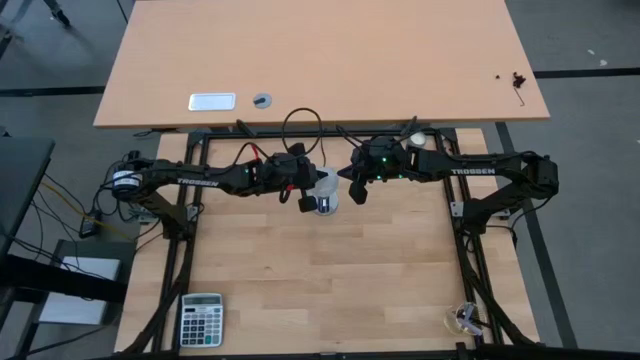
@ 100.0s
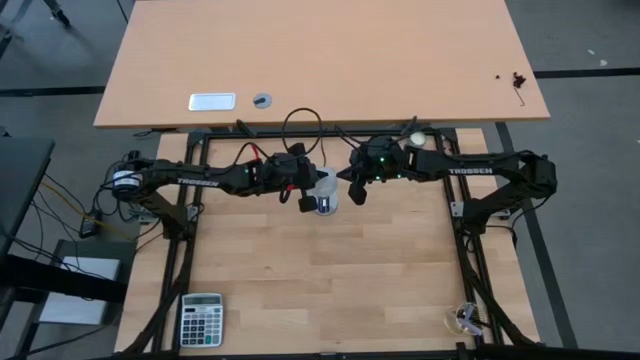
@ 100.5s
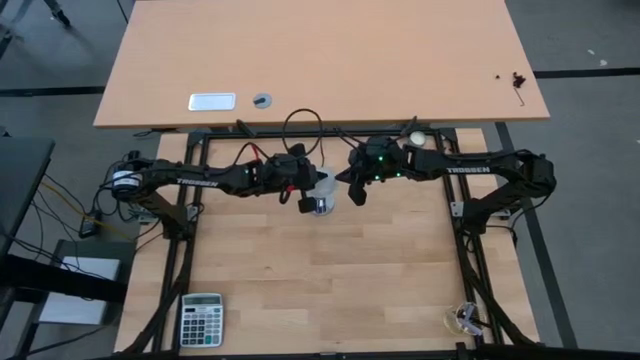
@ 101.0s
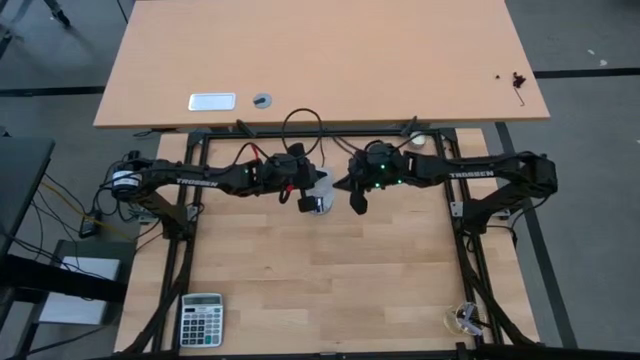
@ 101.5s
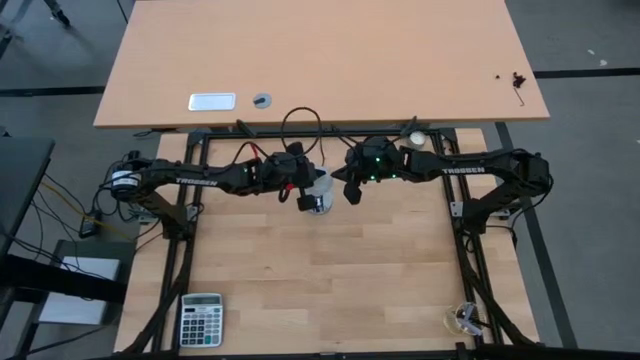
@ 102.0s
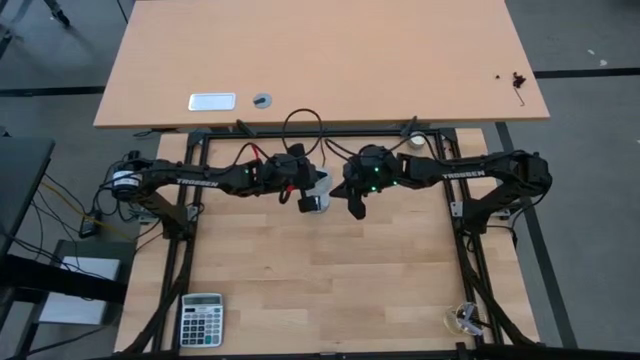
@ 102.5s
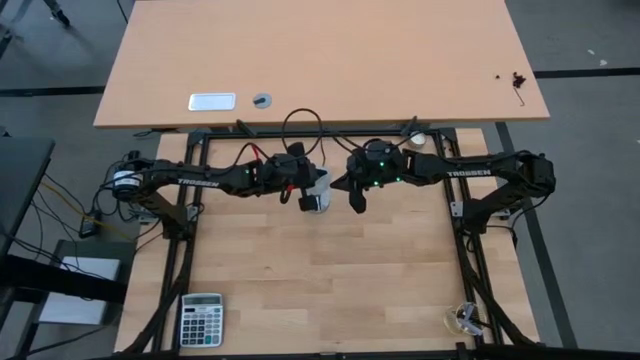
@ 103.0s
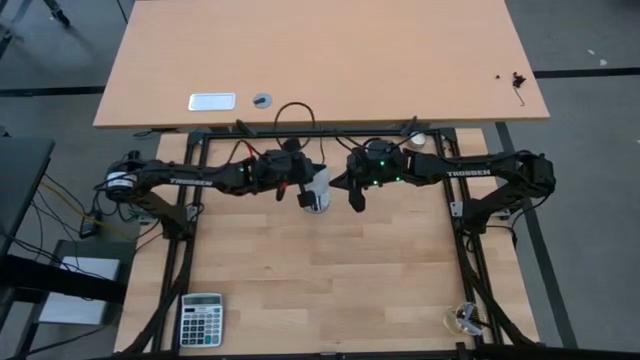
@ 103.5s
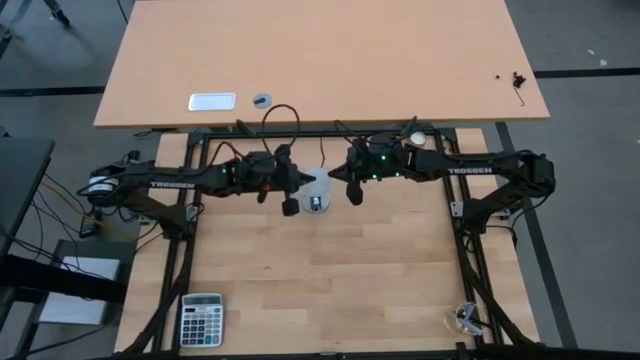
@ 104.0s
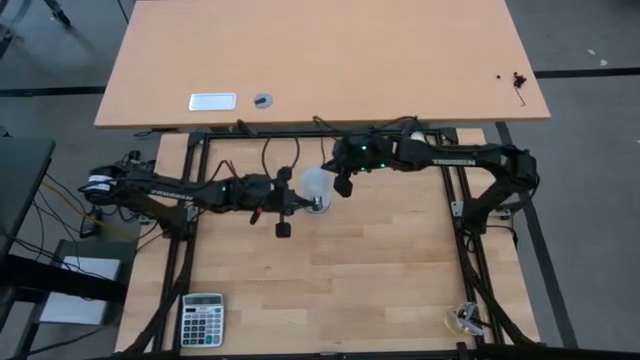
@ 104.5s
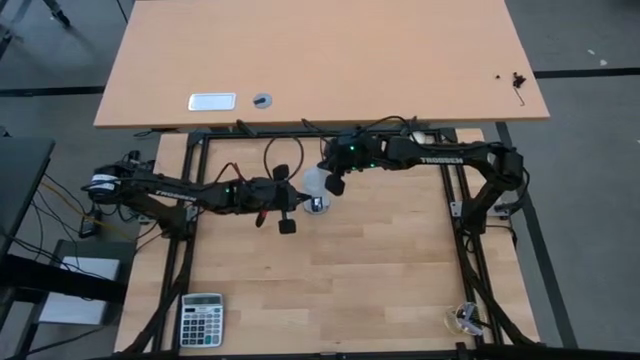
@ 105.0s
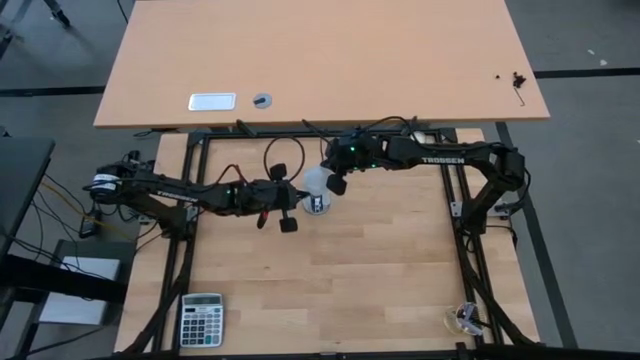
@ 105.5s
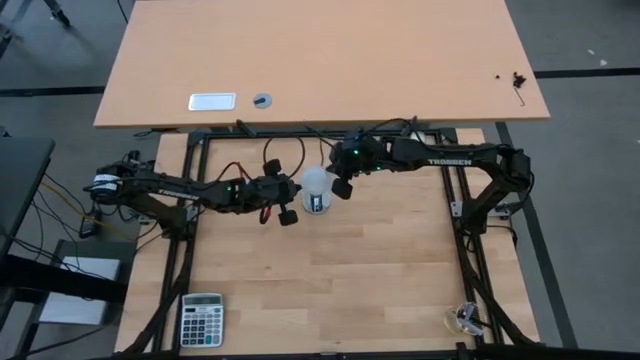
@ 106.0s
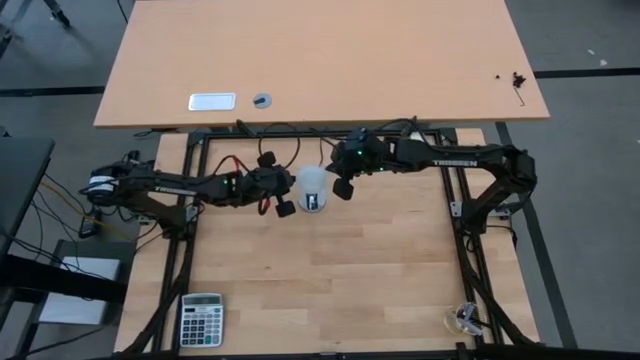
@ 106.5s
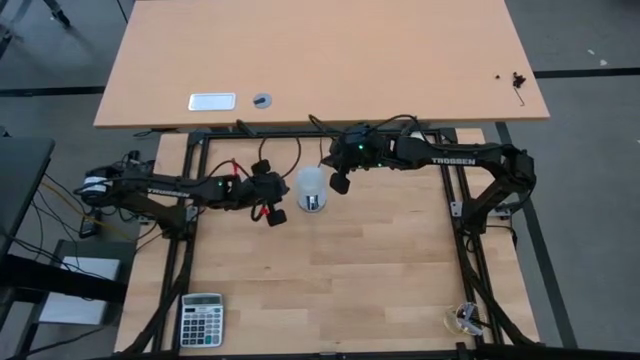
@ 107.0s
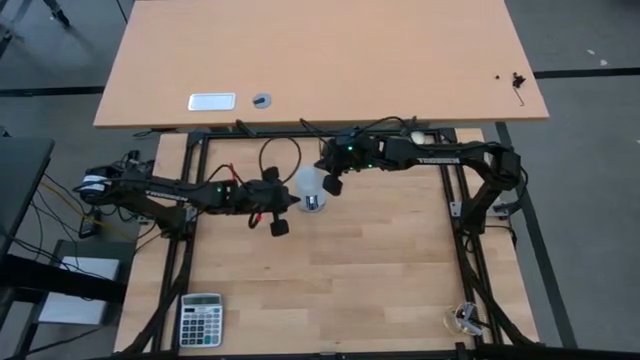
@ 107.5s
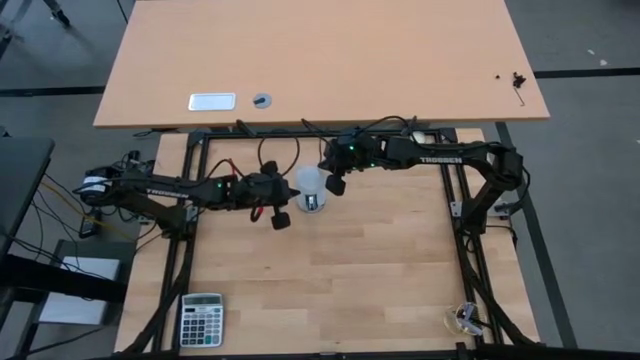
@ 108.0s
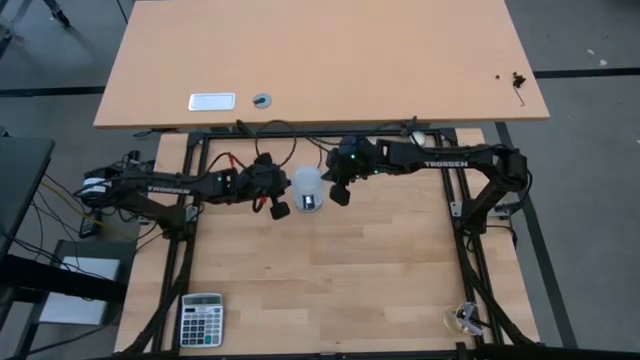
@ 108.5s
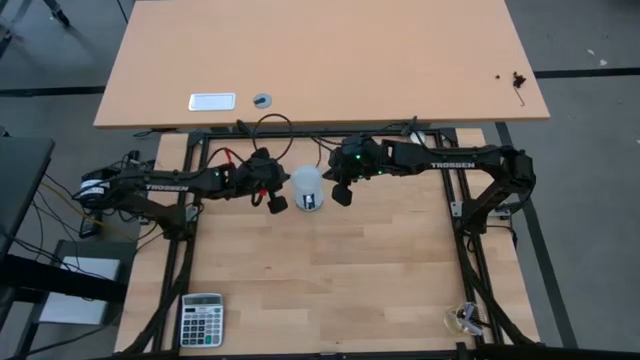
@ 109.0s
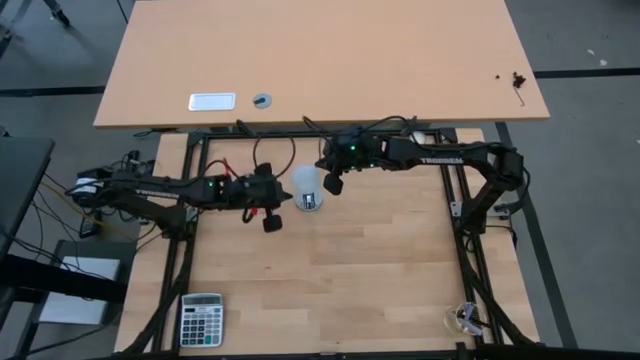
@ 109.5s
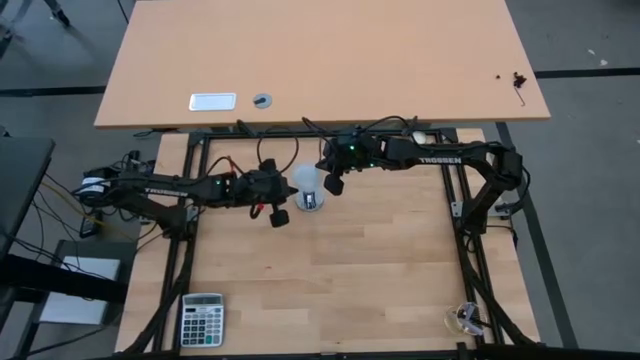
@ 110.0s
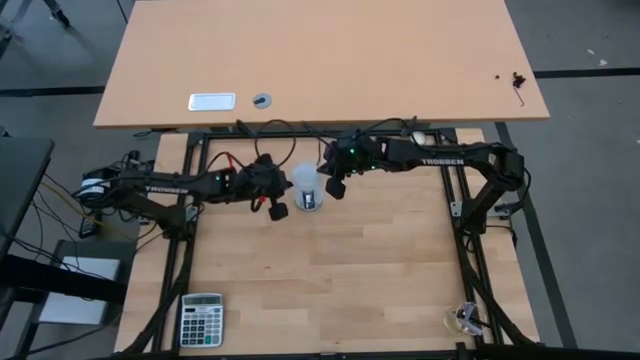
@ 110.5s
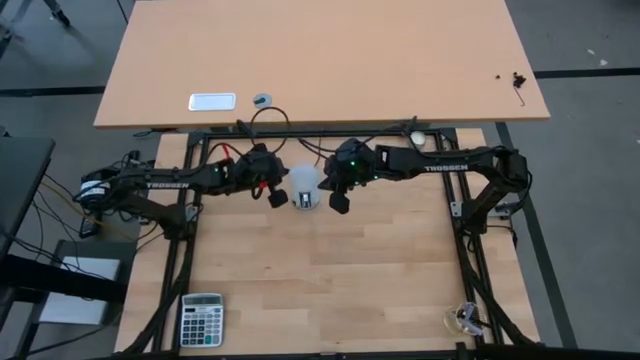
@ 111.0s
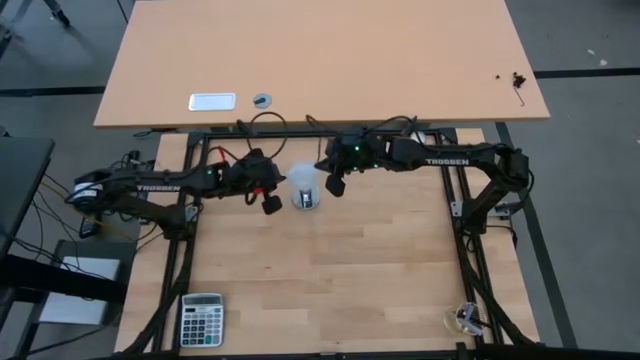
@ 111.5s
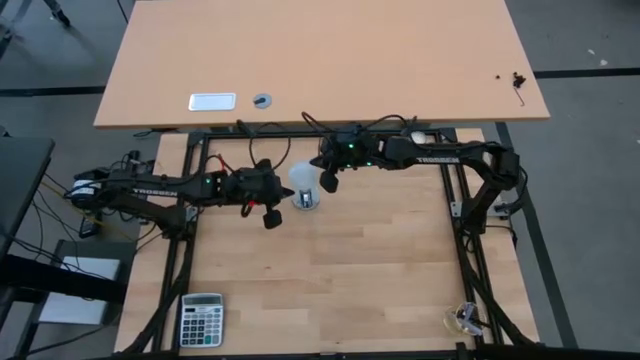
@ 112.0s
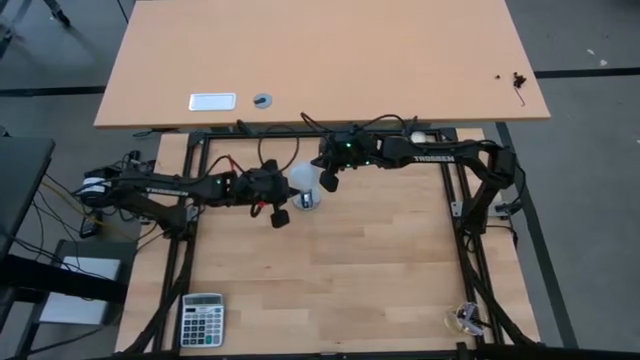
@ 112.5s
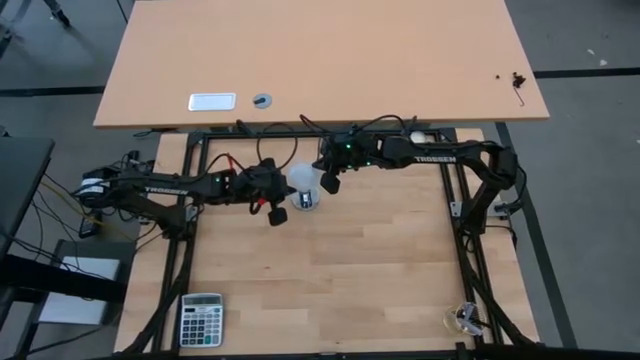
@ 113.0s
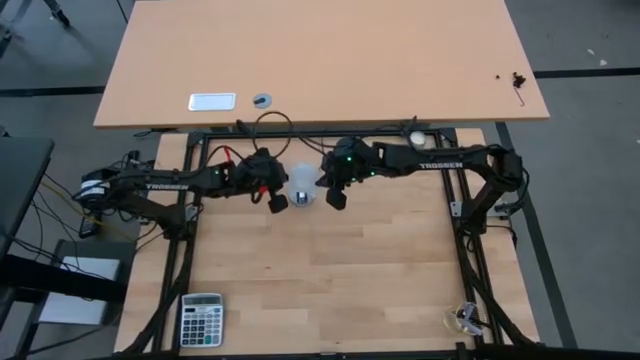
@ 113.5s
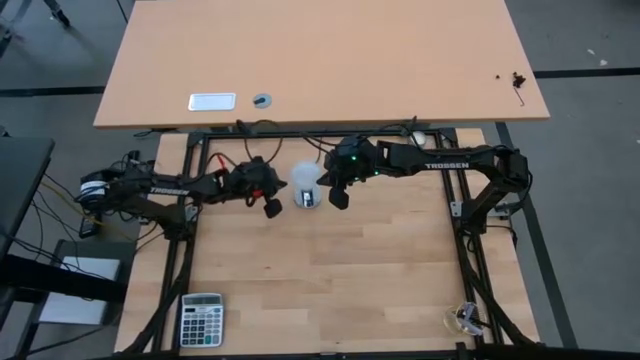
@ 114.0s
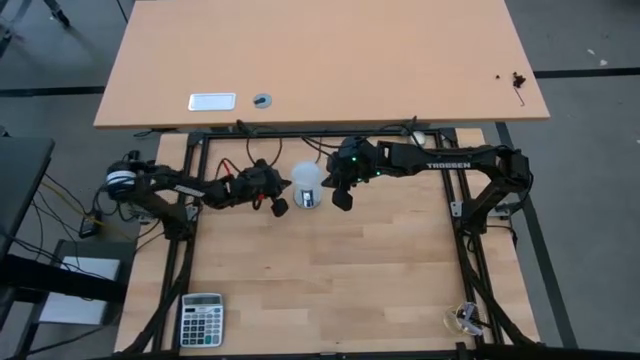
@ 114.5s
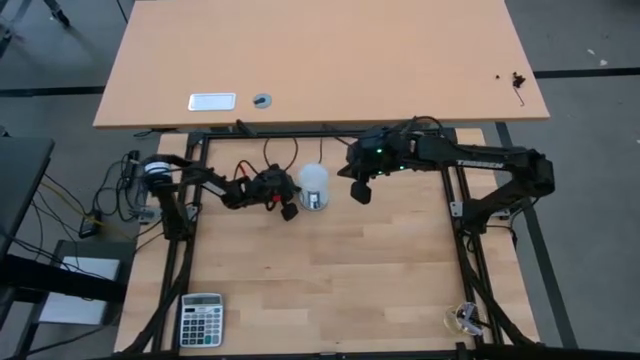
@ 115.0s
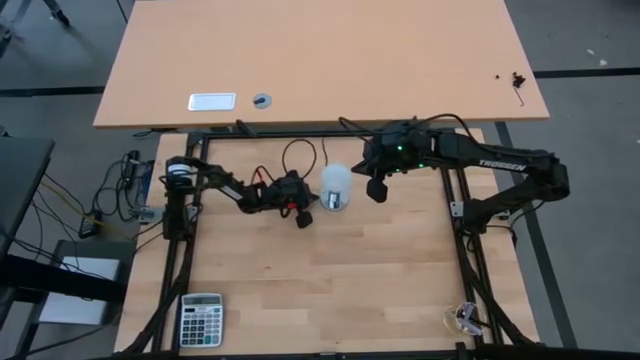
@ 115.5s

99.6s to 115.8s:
Task: Screw lightbulb
Insert the lightbulb into the silver lamp socket

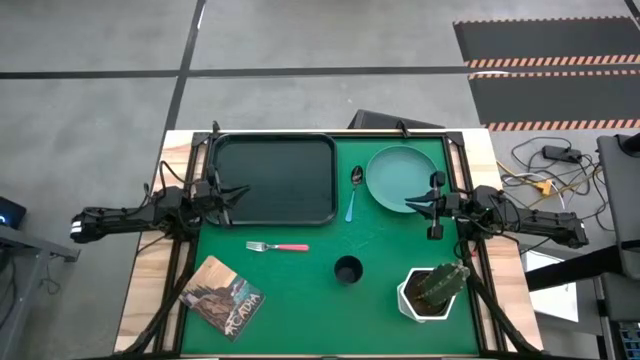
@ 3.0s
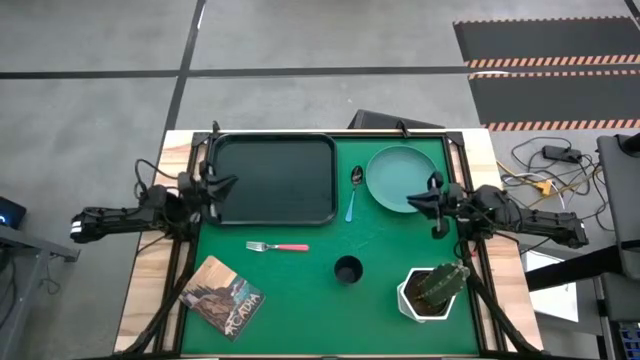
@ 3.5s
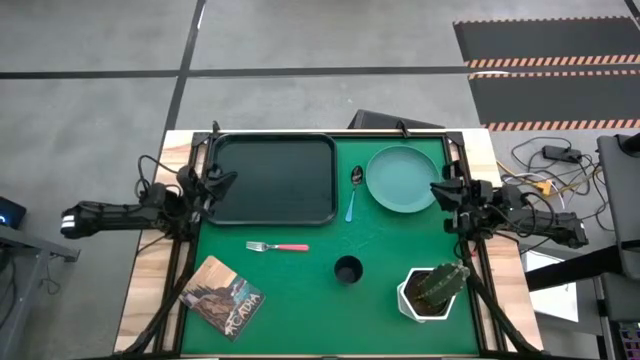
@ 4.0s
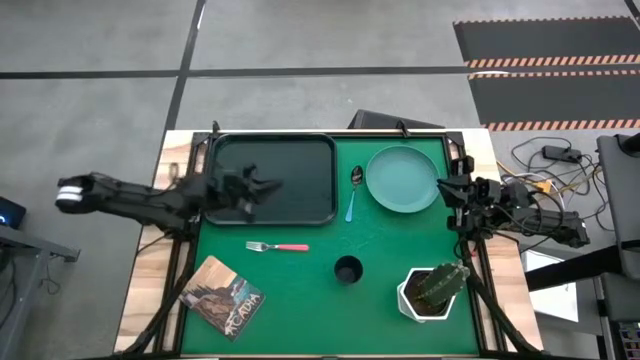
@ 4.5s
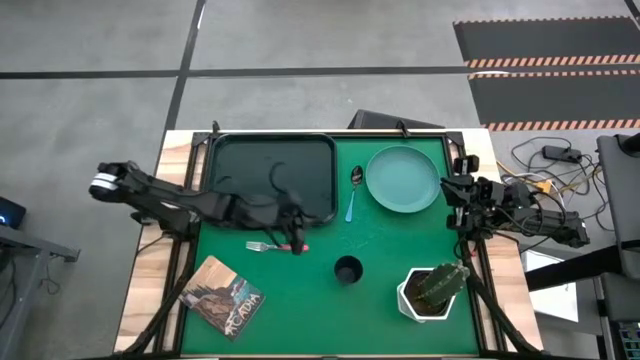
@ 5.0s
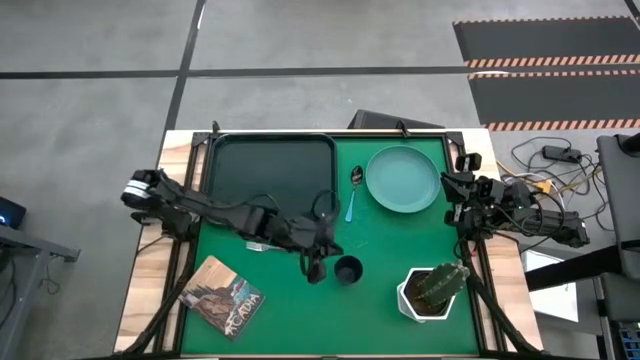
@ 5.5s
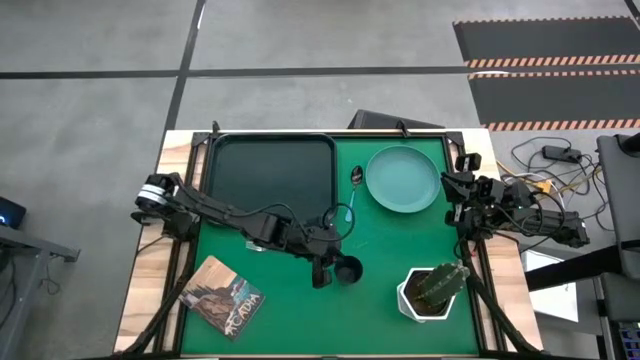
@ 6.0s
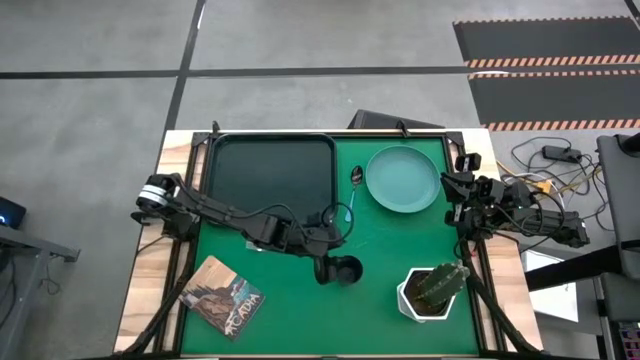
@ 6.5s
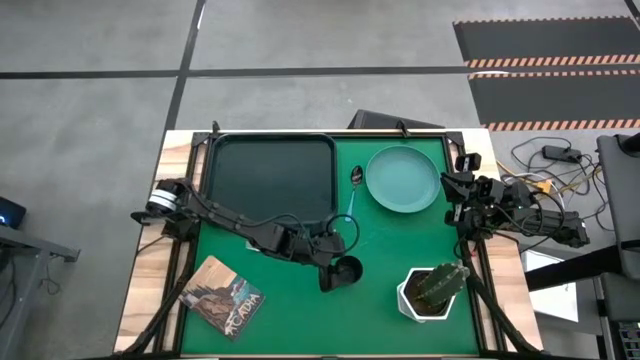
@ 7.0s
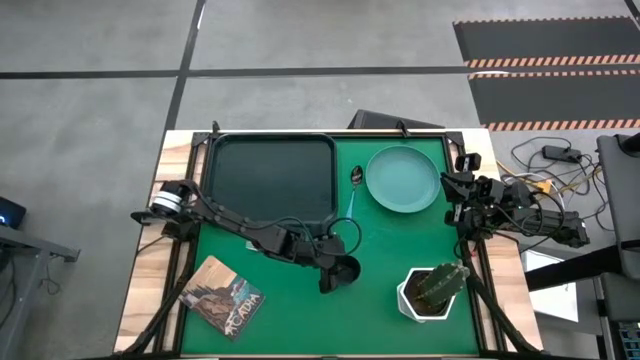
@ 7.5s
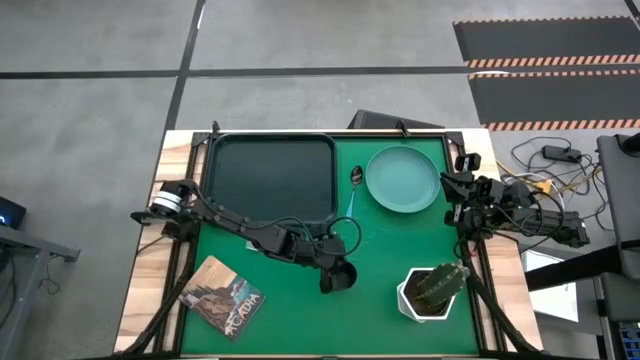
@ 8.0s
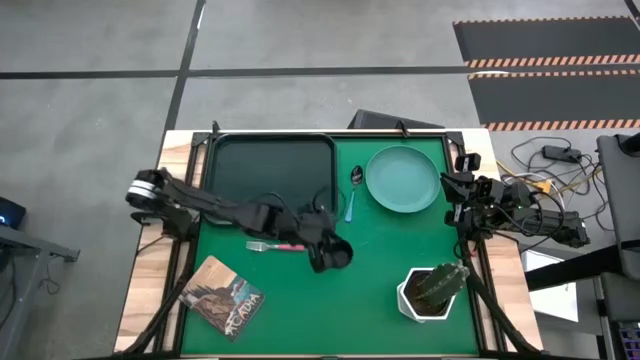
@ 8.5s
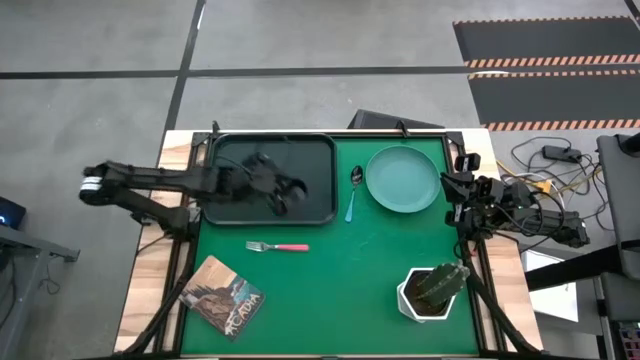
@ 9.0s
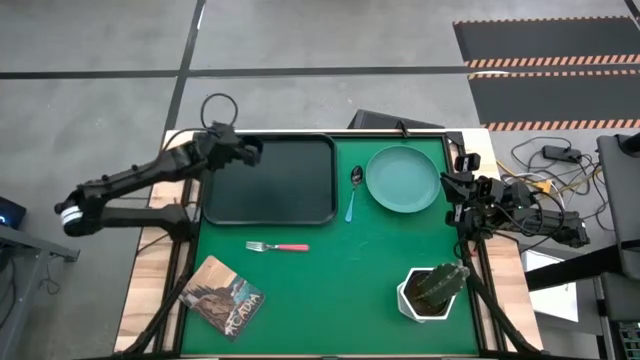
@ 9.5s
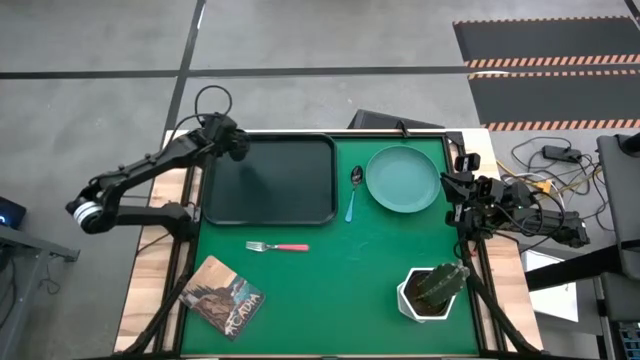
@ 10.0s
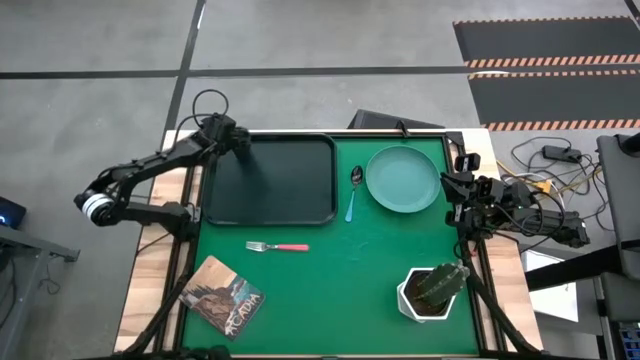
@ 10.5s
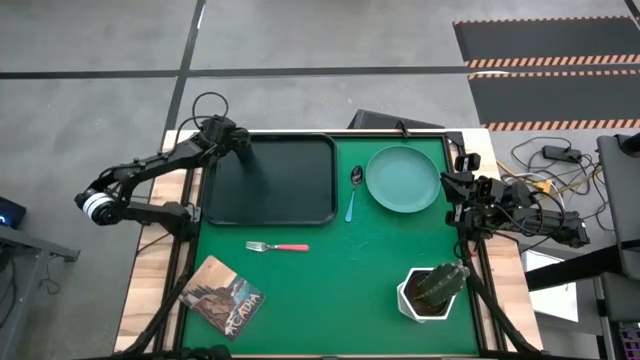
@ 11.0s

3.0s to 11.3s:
Task: Pick and place plate/cup/fork/spoon on tray
Put the black cup on the black serving tray
